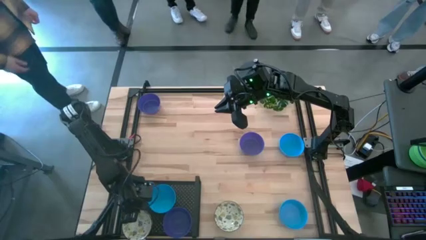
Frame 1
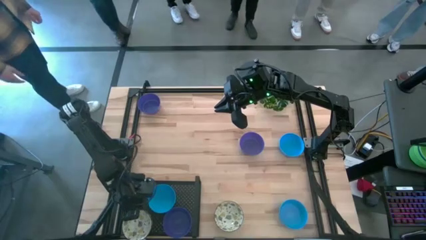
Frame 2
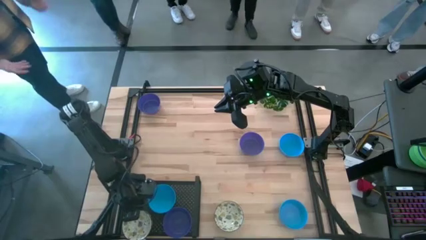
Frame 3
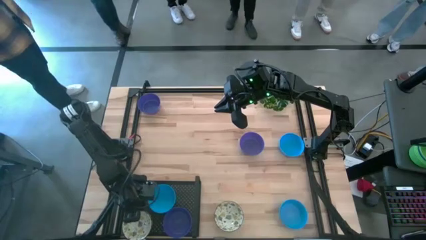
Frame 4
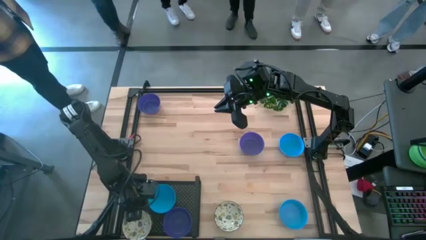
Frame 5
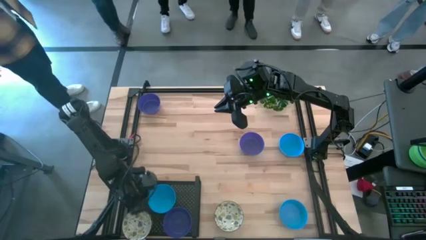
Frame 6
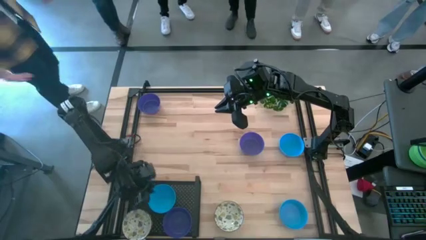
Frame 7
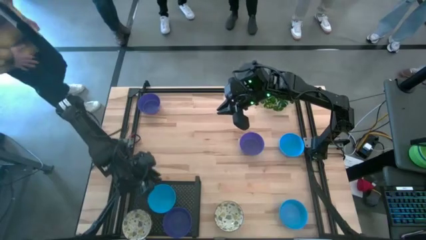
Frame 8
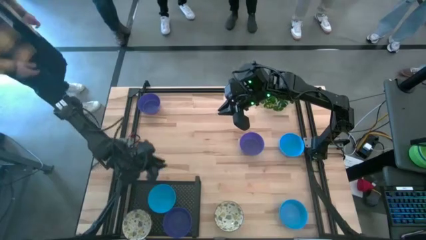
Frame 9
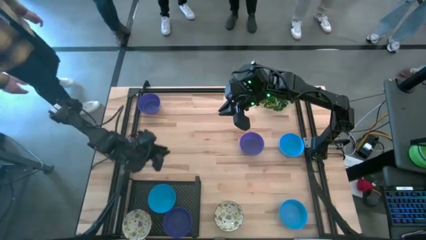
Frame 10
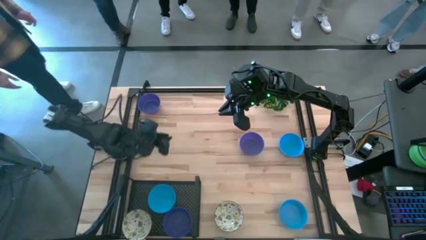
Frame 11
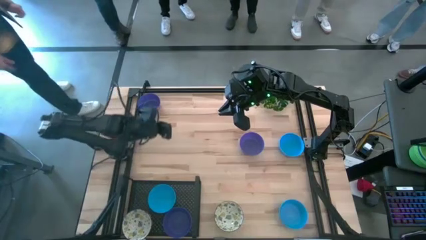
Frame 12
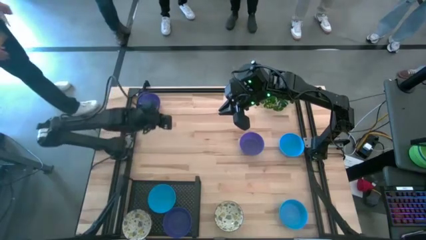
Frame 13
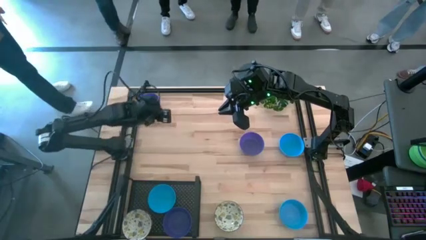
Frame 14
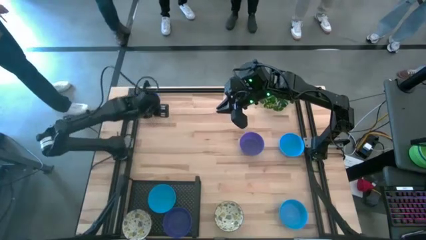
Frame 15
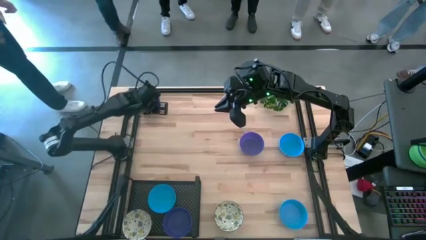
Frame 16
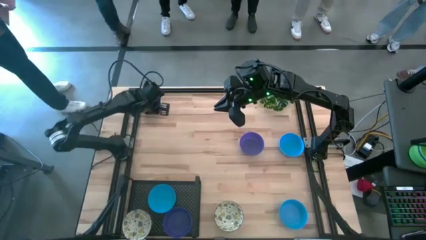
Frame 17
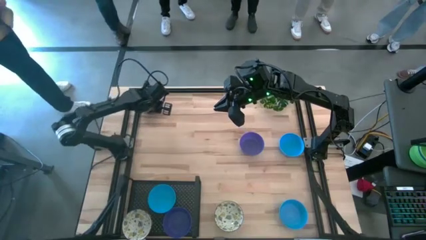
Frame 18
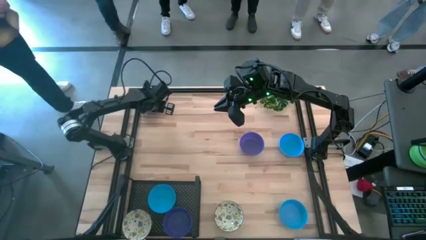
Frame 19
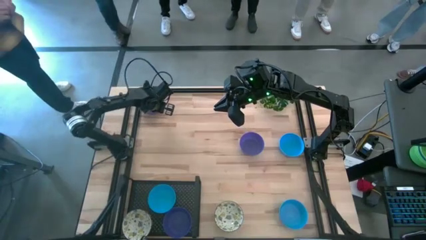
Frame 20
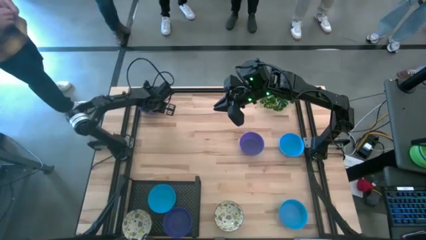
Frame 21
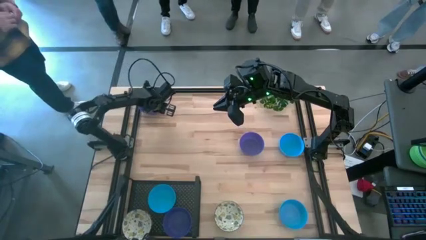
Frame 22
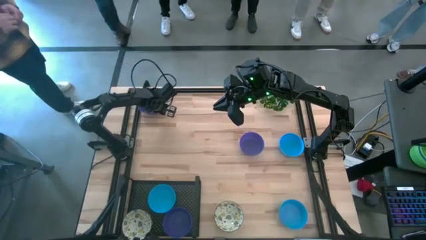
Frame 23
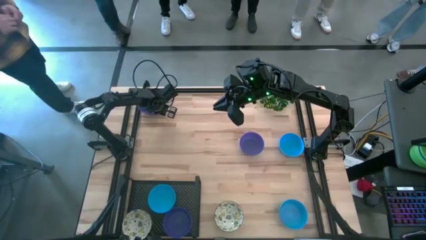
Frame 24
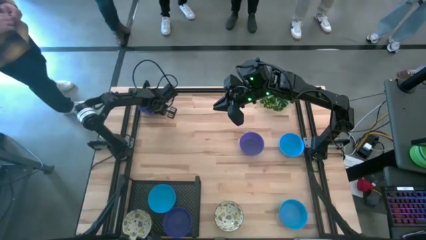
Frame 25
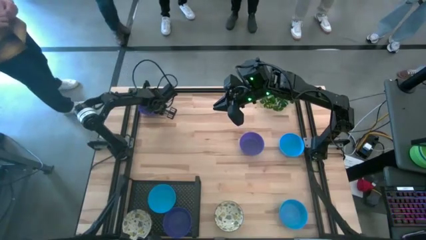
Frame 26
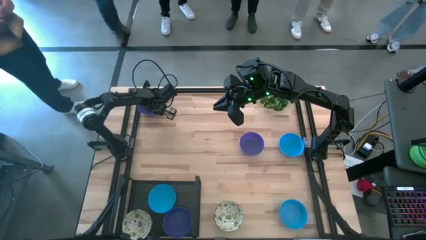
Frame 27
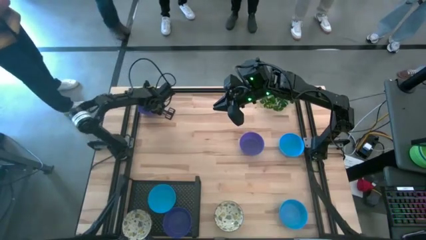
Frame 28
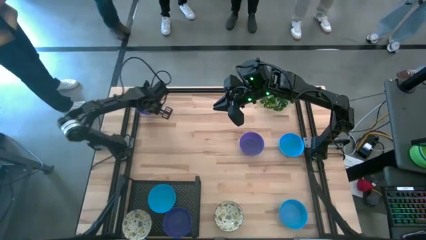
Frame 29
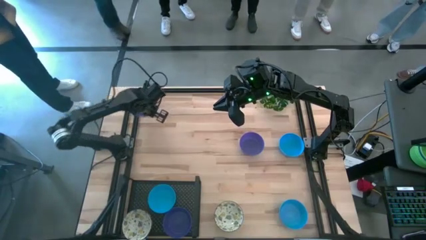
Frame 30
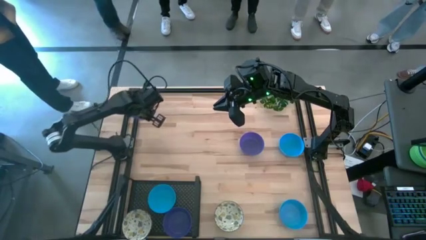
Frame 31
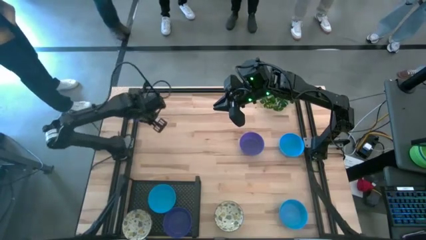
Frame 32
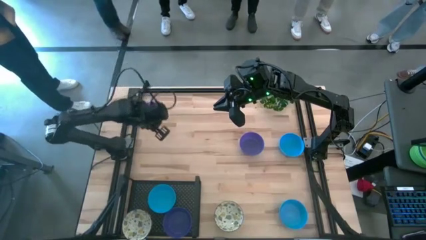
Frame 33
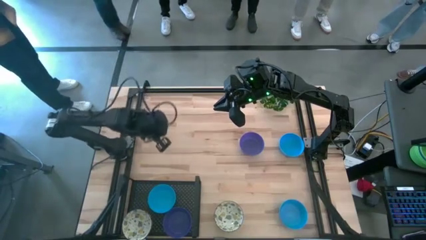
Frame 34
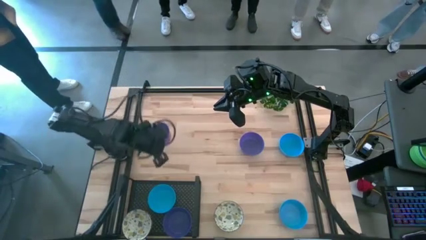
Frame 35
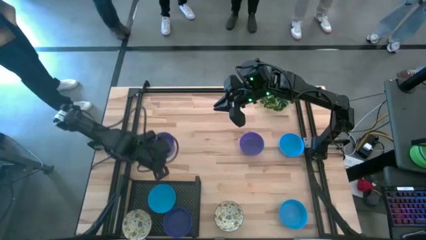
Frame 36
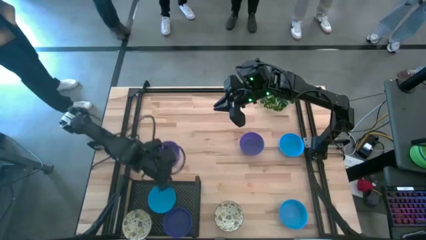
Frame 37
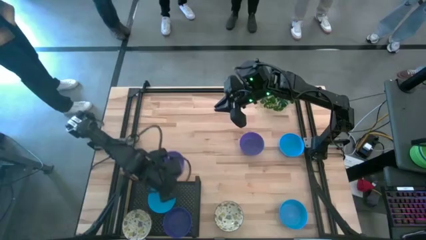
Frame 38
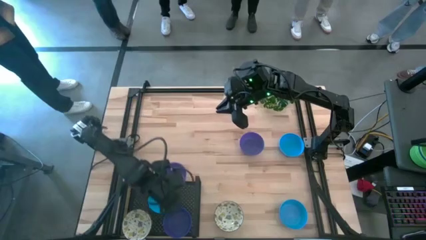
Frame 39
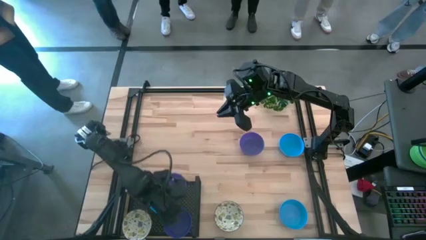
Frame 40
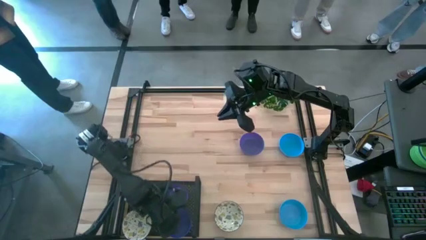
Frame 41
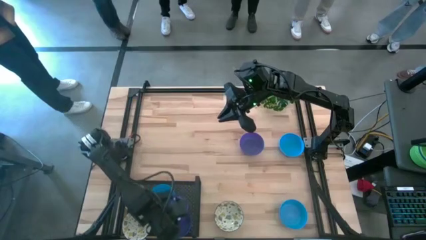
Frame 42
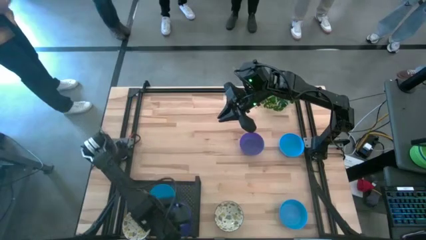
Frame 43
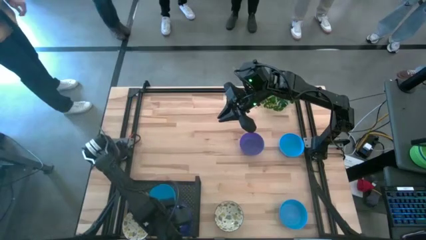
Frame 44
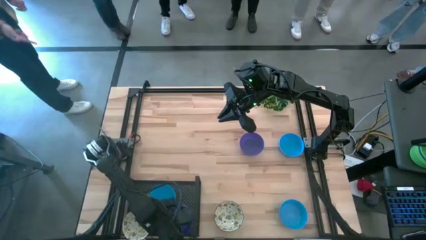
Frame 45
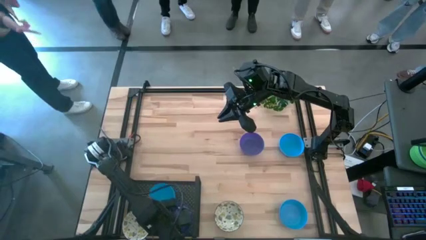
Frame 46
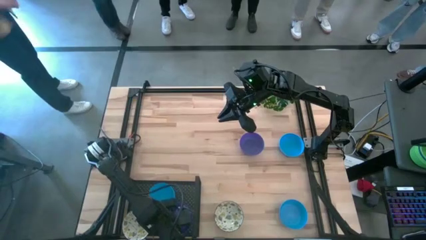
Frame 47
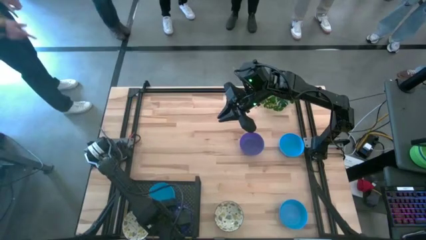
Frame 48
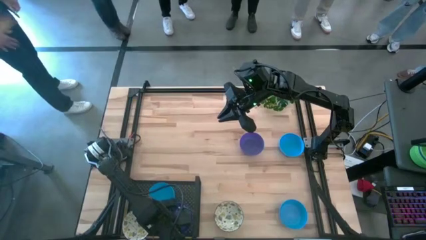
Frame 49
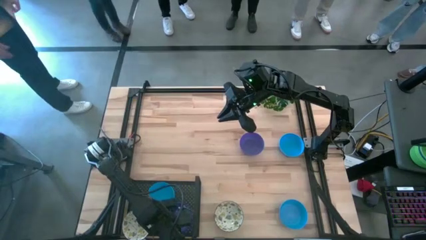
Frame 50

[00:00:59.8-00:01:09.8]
Task: Pick & Place Mini bowls
Stack the left purple bowl on the purple bowl on the shelf
